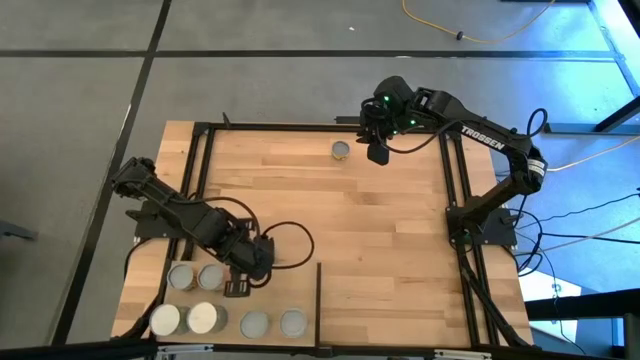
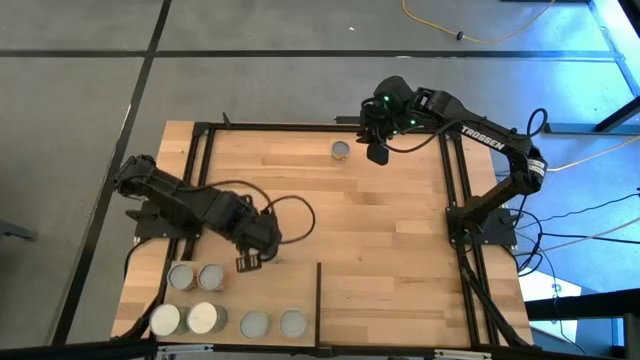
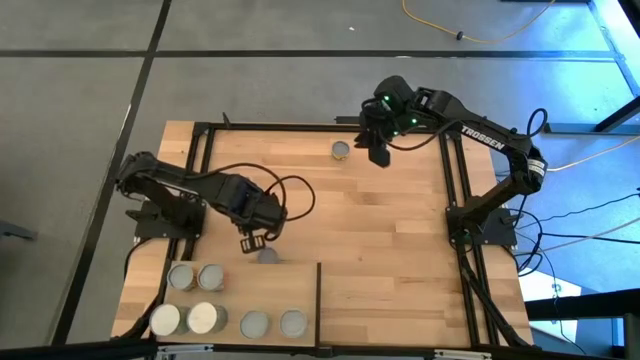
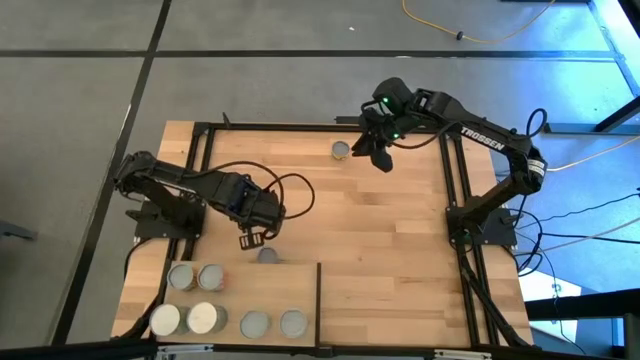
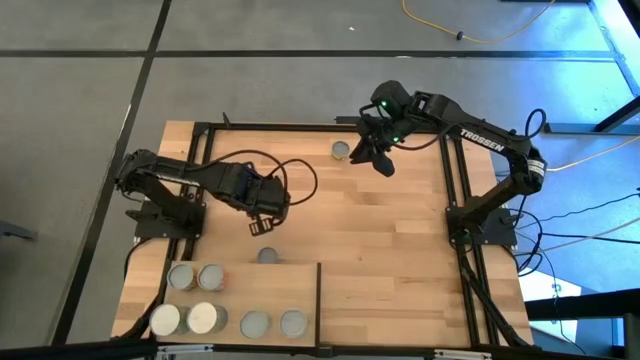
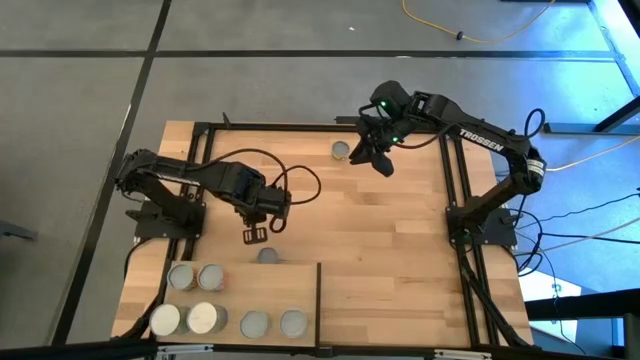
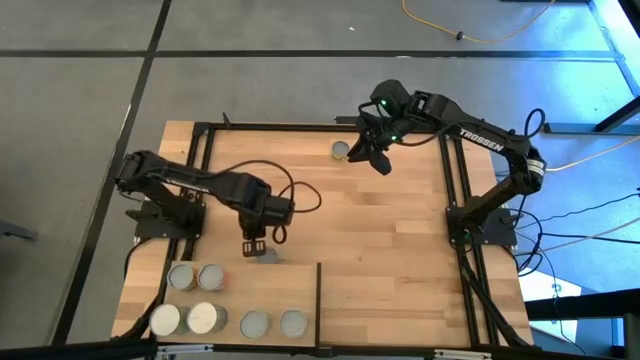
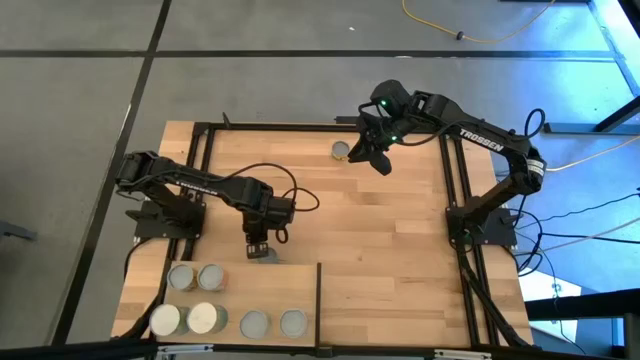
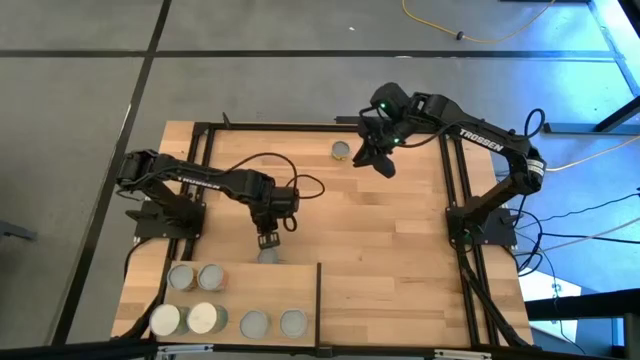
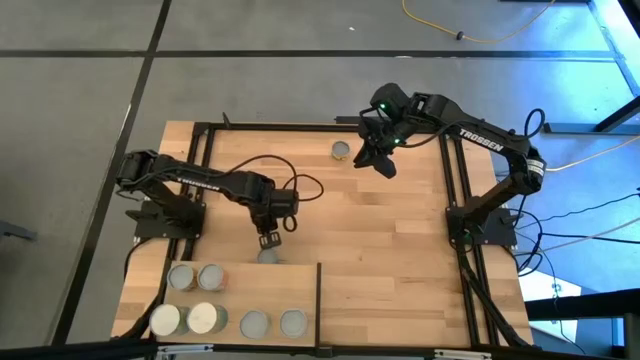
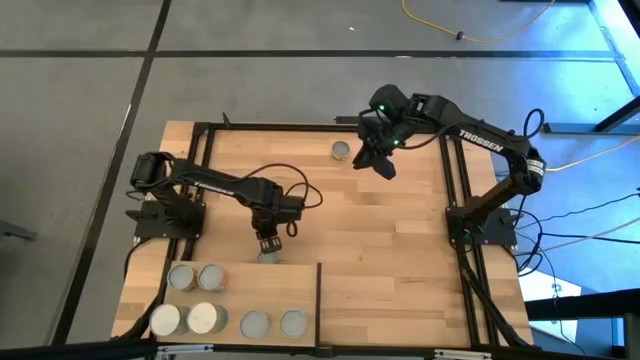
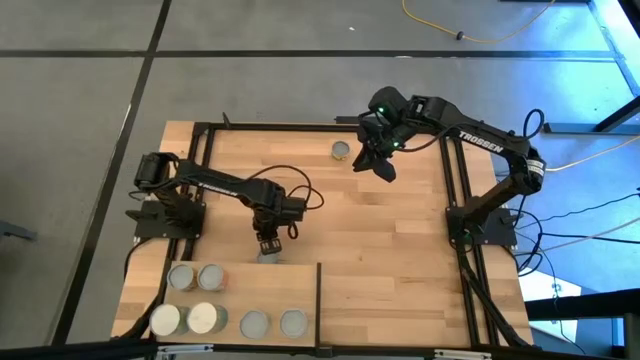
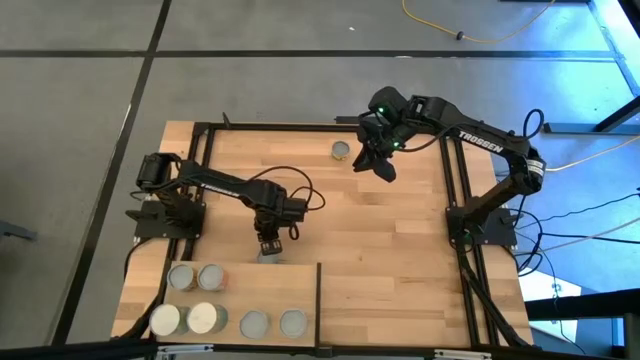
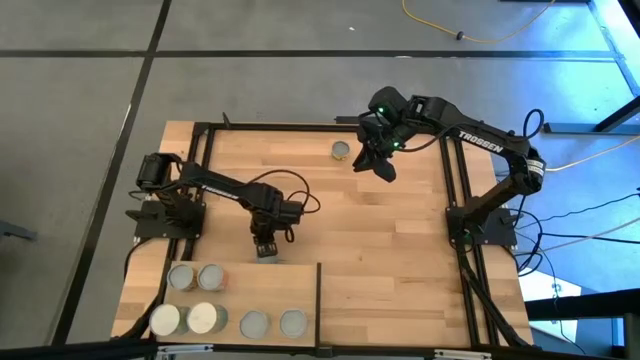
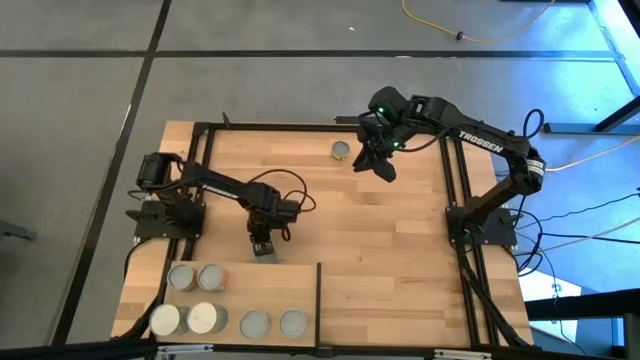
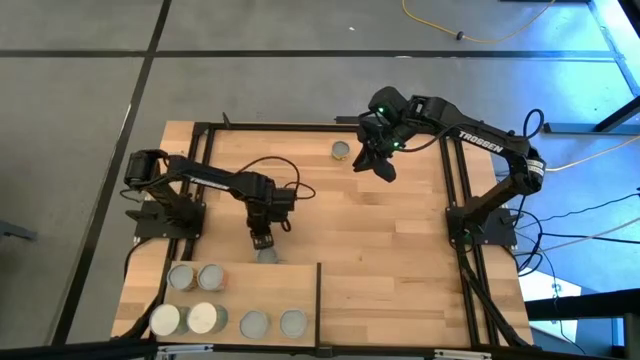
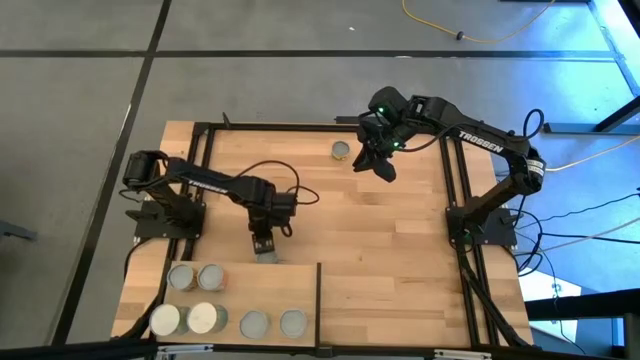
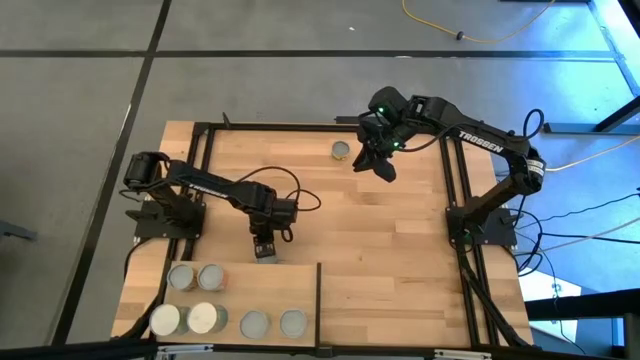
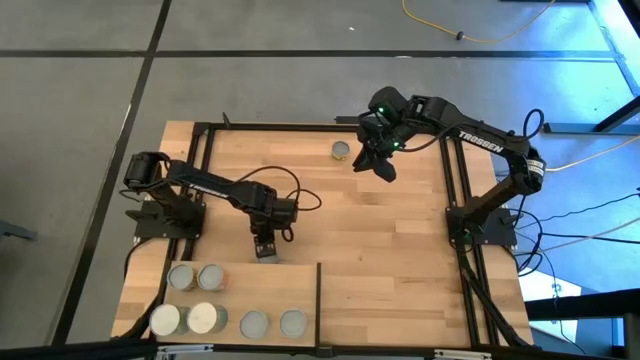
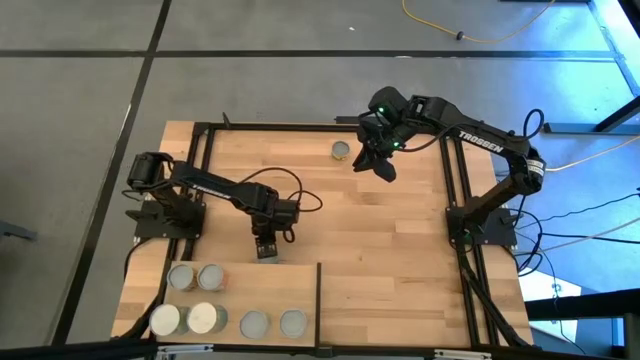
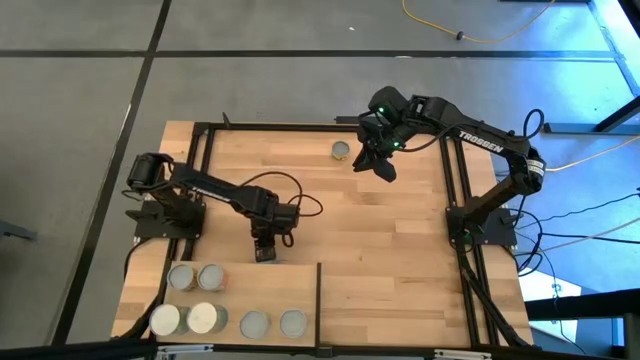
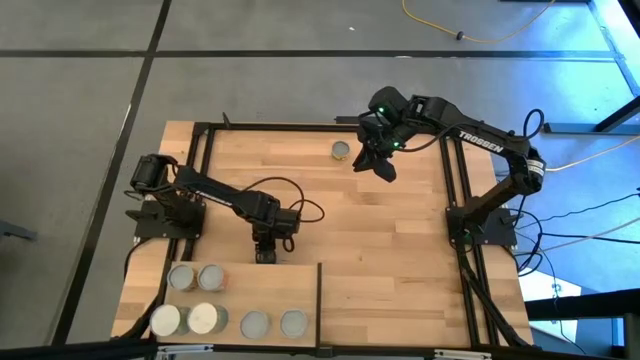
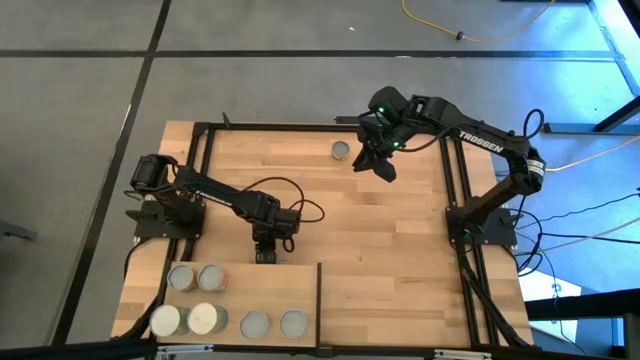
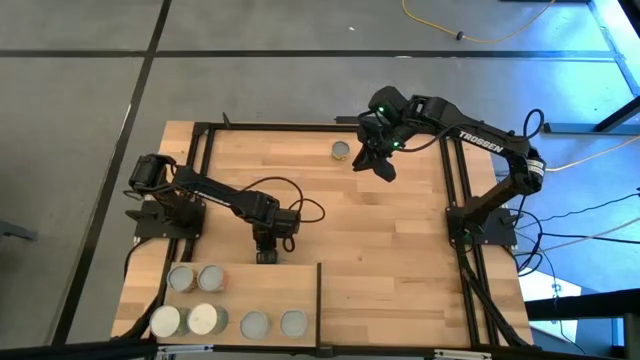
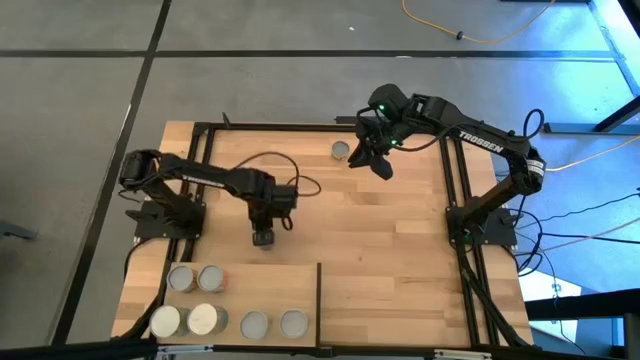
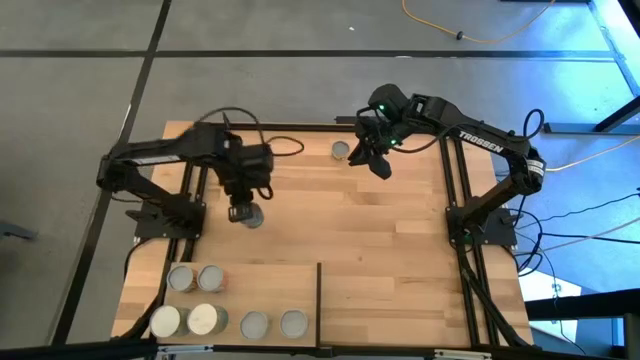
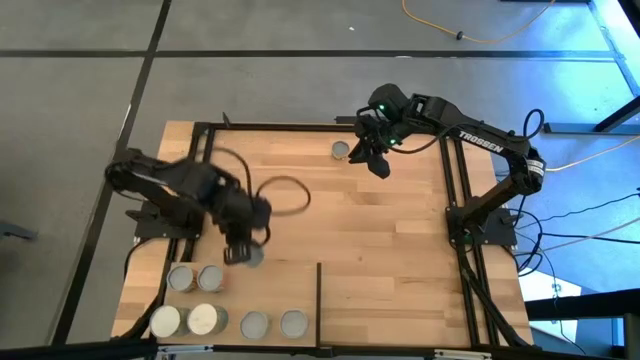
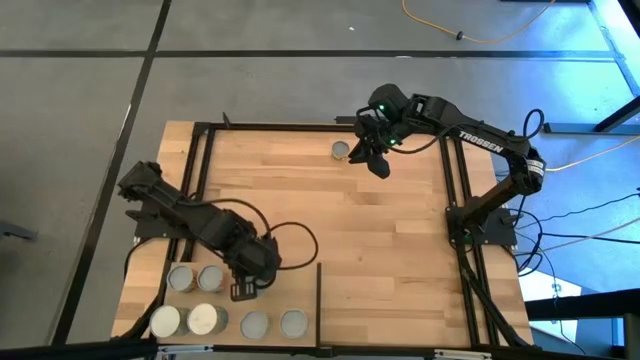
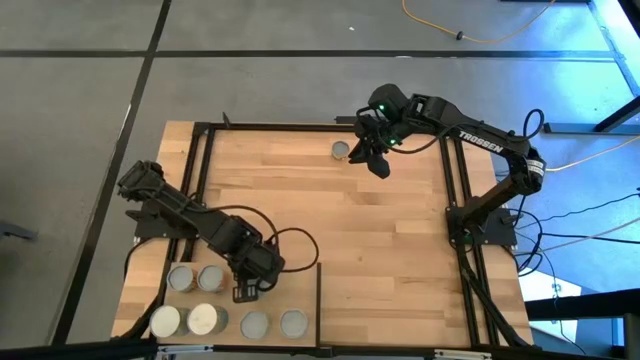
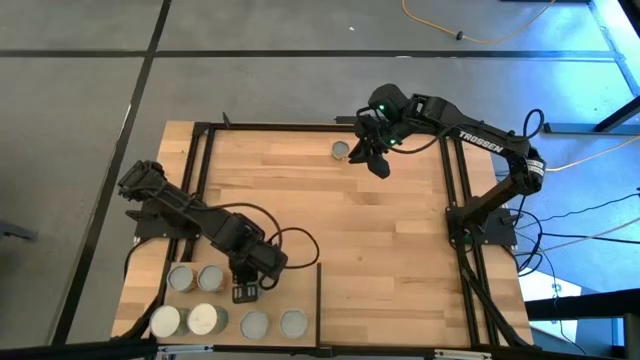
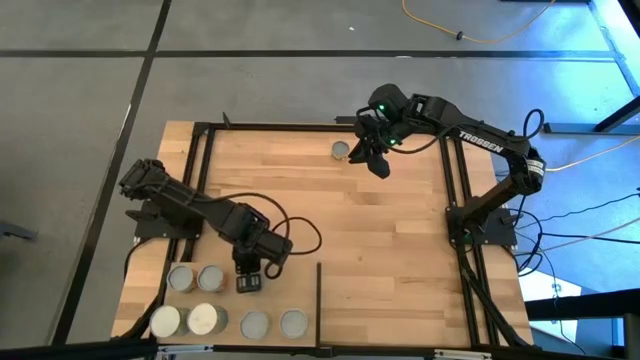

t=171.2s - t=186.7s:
Task: Pick and place cans onto a shelf
Put the blue tuna can on the shelf

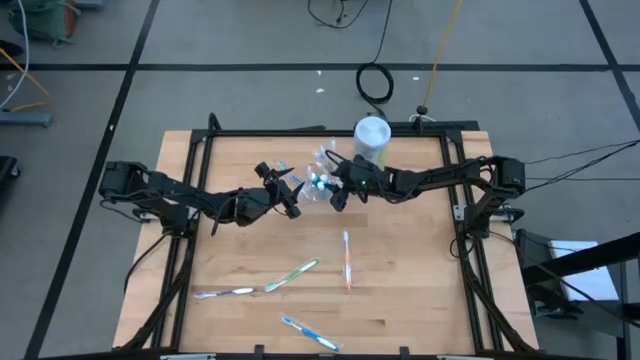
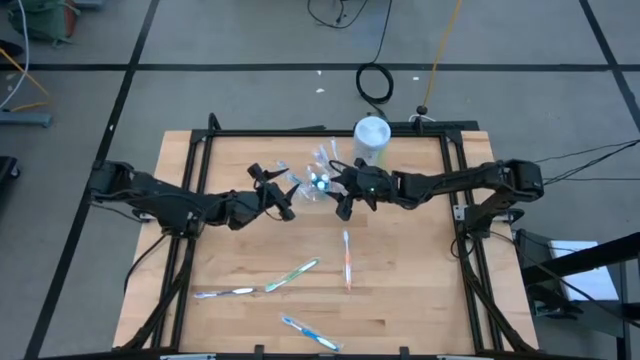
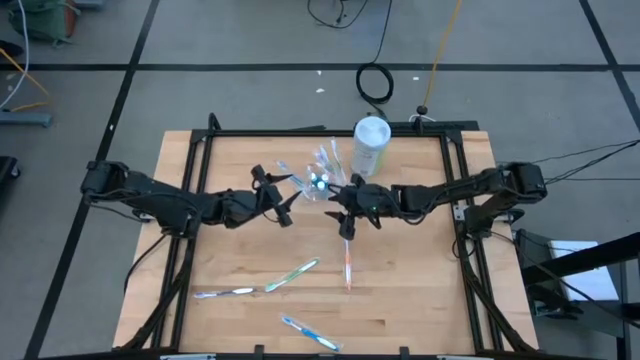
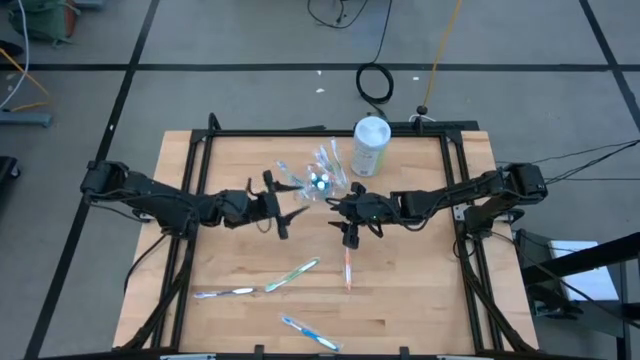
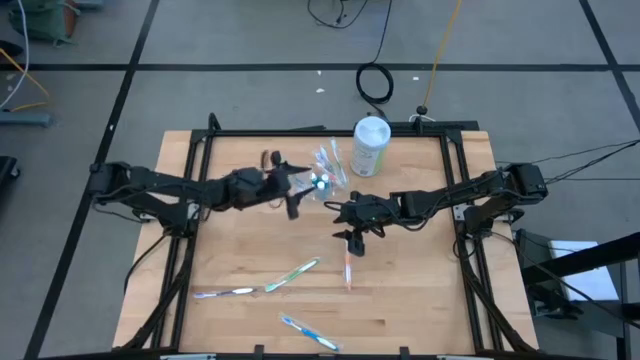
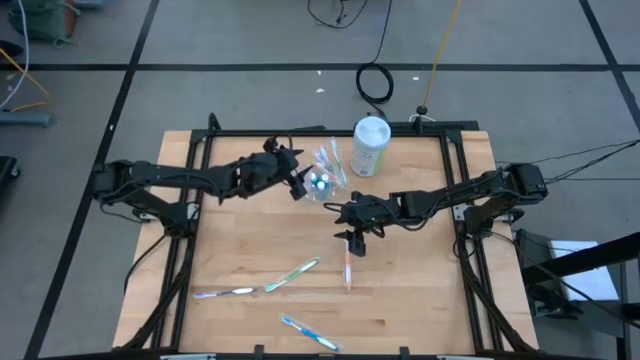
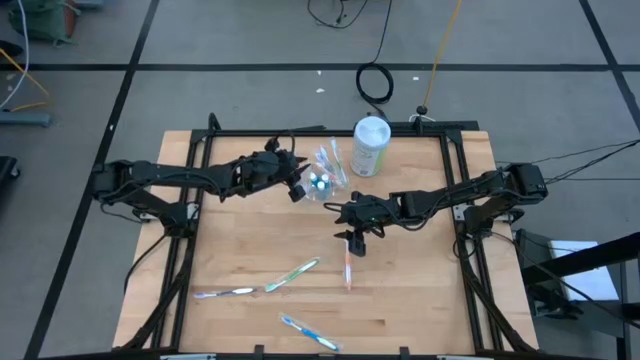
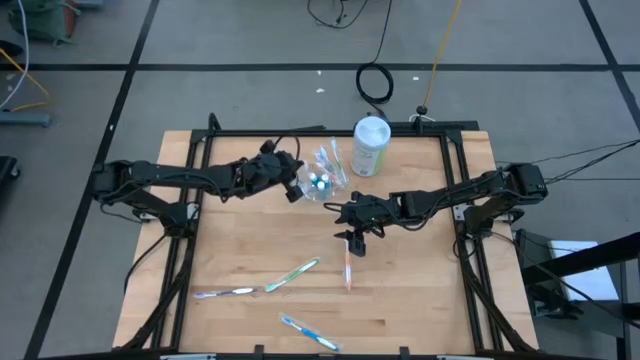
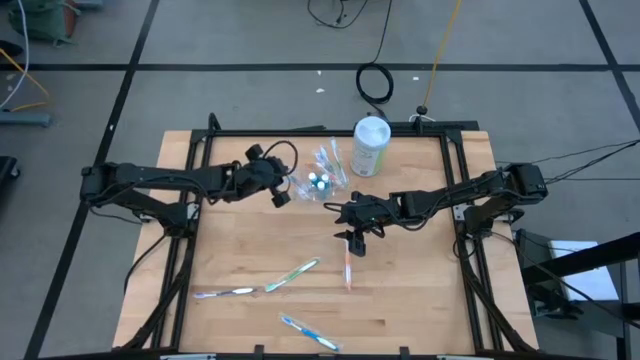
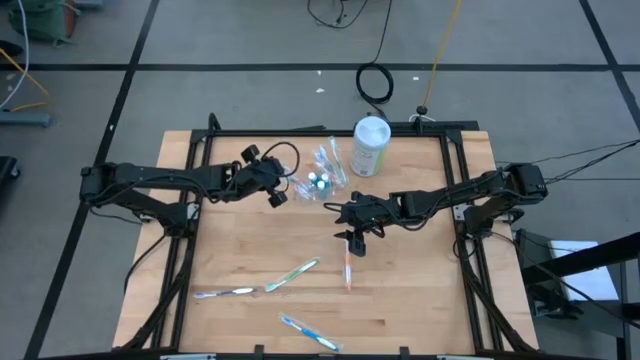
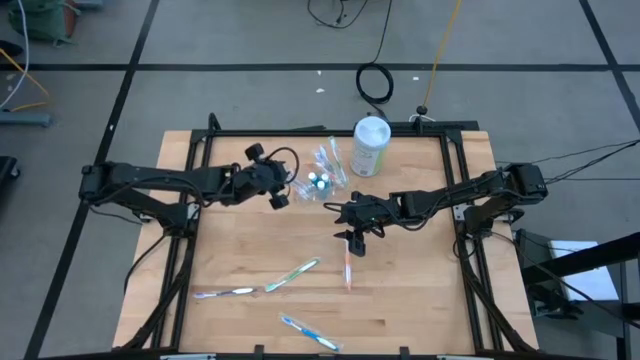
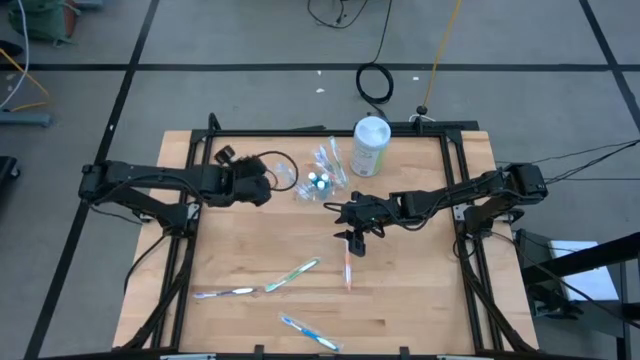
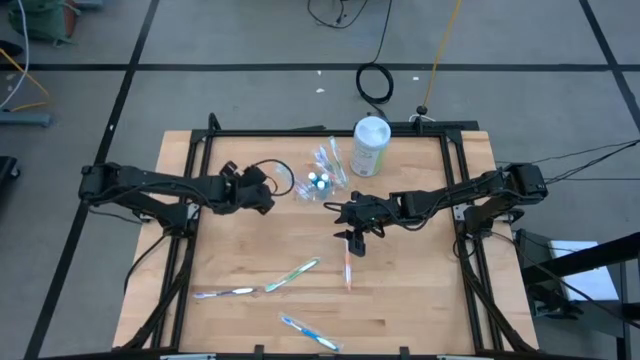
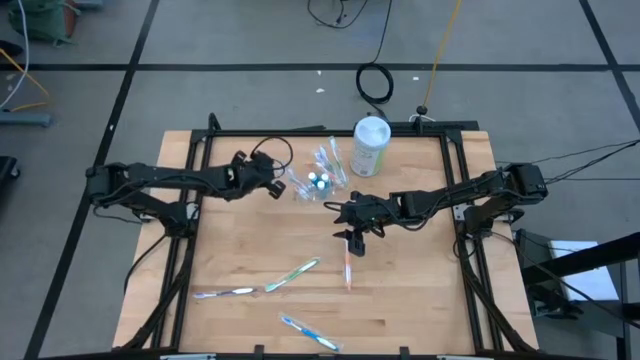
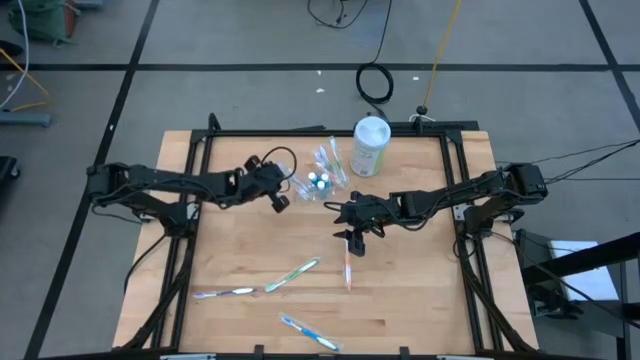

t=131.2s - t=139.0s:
Task: Pick & Place toothbrushing station
Adjust the toothbrushes in the transparent organizer
